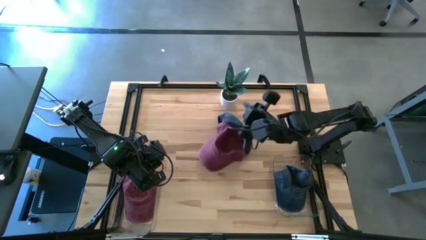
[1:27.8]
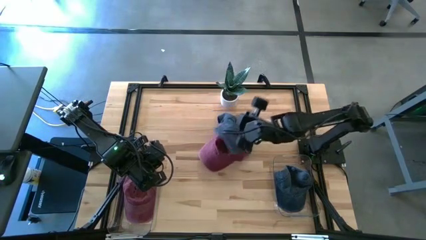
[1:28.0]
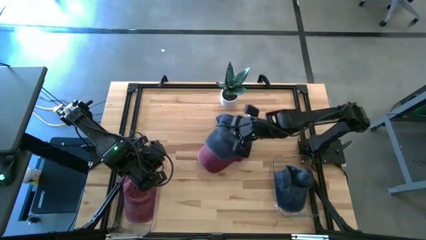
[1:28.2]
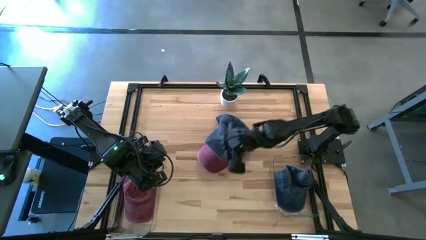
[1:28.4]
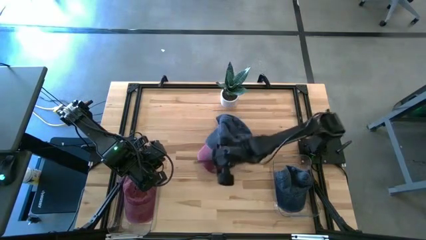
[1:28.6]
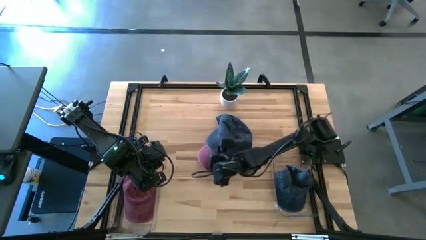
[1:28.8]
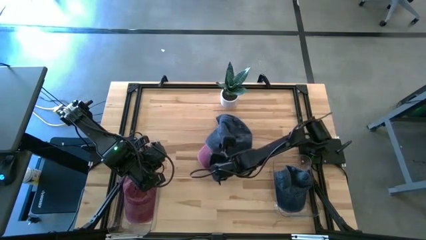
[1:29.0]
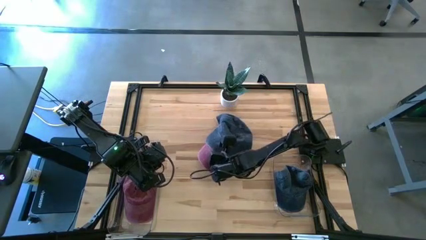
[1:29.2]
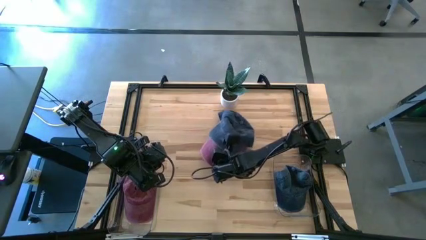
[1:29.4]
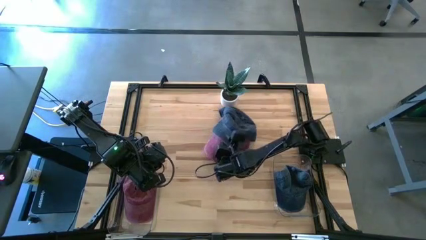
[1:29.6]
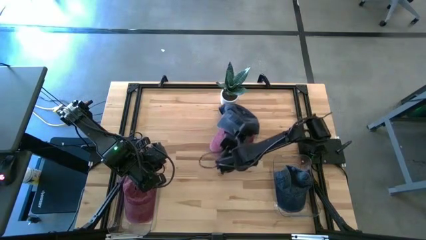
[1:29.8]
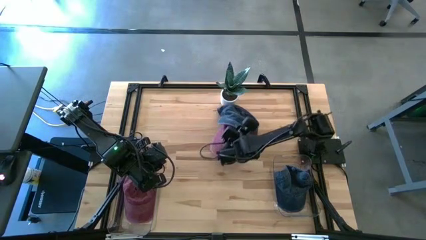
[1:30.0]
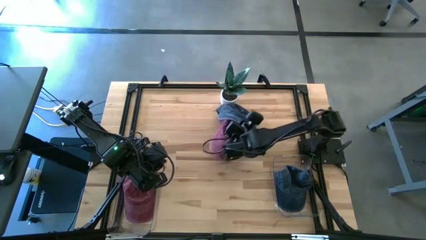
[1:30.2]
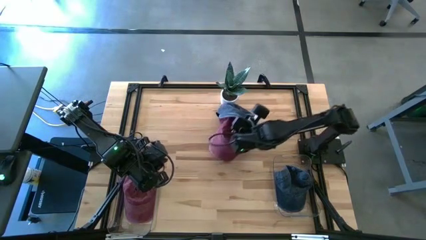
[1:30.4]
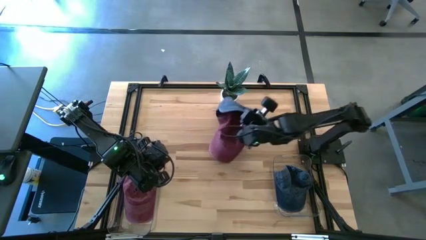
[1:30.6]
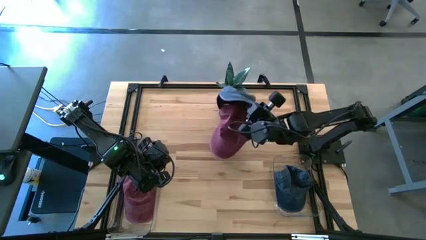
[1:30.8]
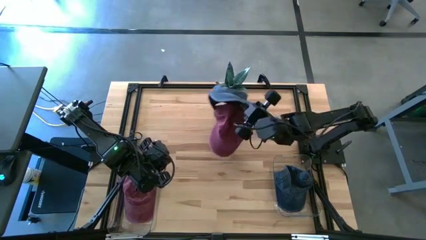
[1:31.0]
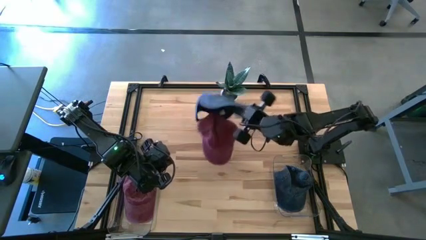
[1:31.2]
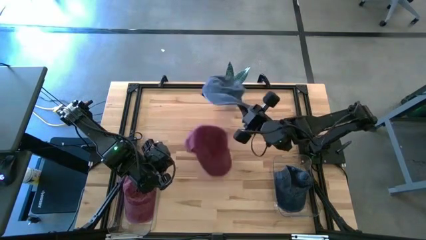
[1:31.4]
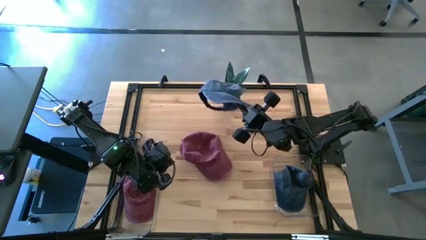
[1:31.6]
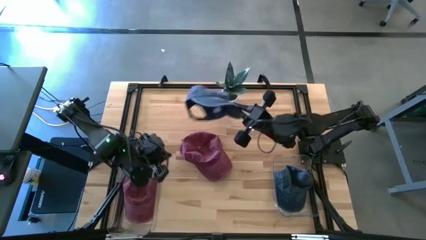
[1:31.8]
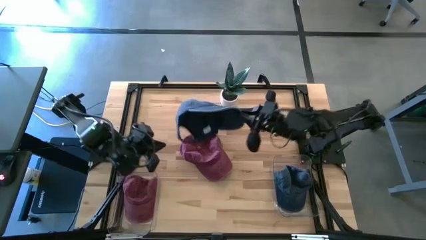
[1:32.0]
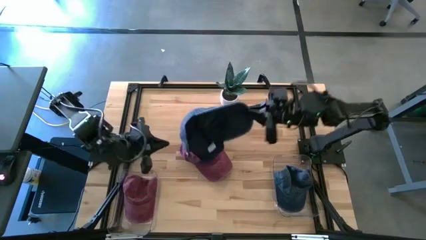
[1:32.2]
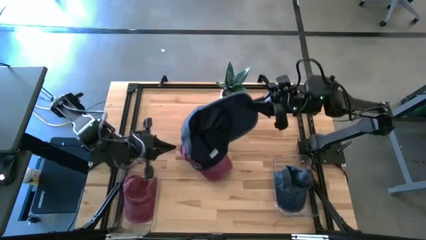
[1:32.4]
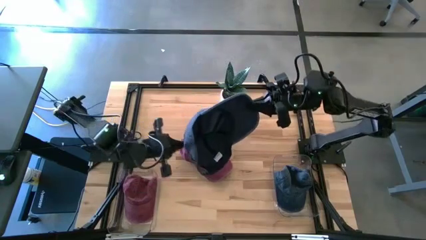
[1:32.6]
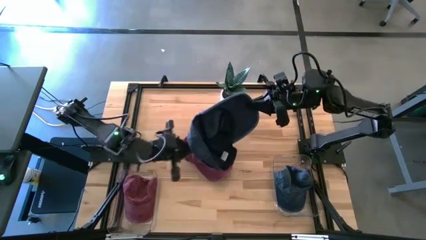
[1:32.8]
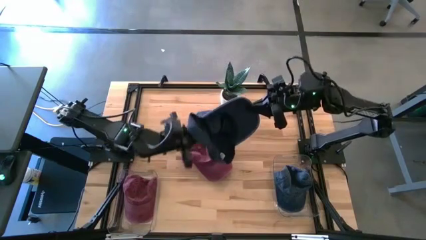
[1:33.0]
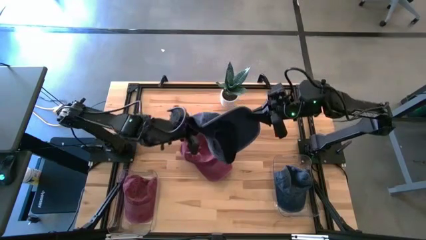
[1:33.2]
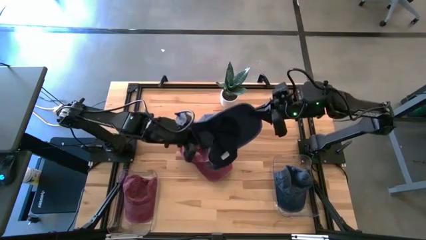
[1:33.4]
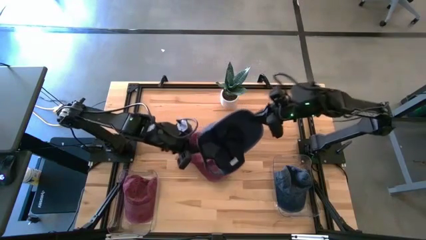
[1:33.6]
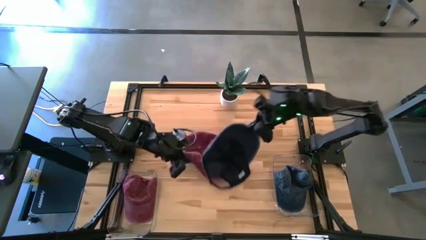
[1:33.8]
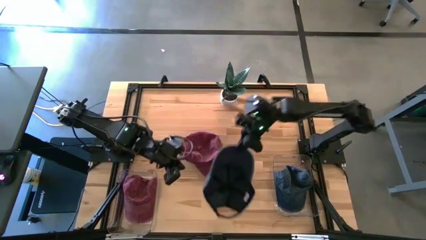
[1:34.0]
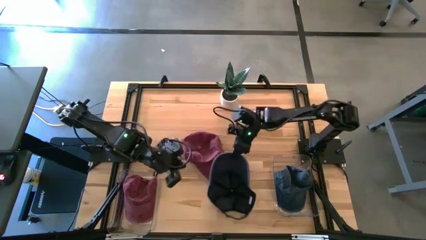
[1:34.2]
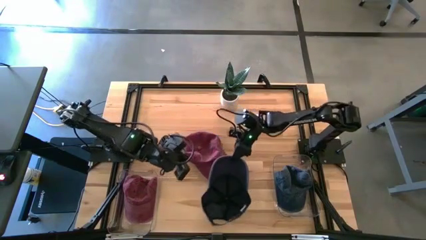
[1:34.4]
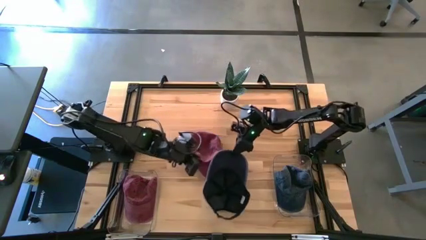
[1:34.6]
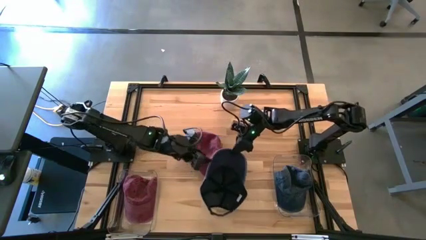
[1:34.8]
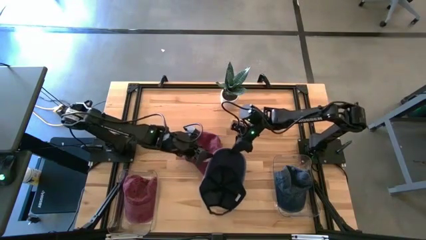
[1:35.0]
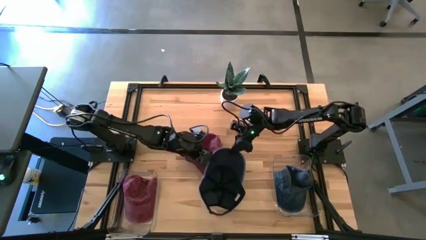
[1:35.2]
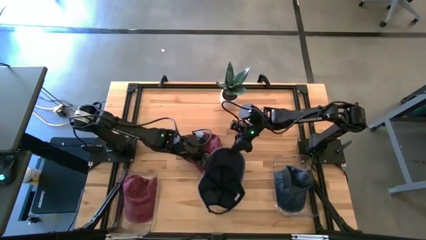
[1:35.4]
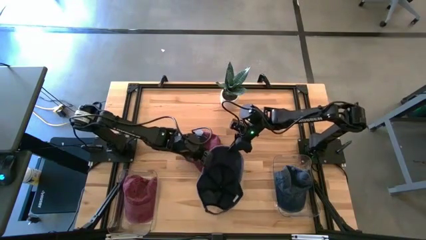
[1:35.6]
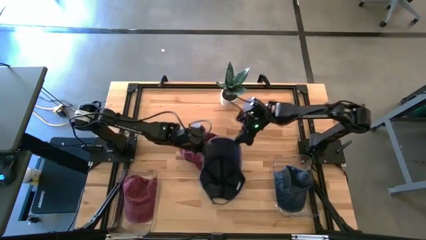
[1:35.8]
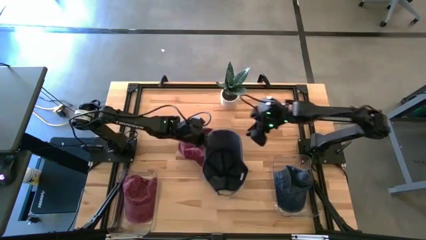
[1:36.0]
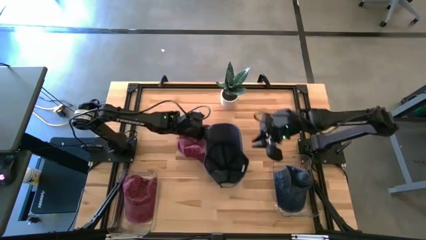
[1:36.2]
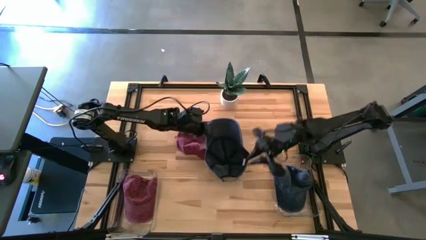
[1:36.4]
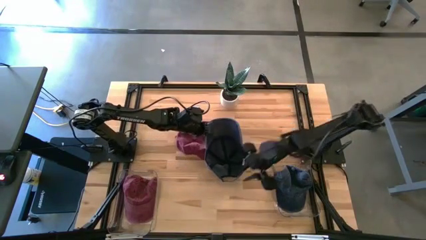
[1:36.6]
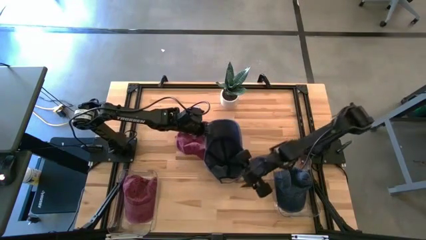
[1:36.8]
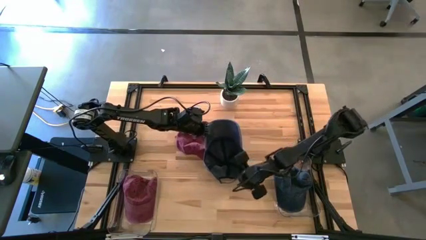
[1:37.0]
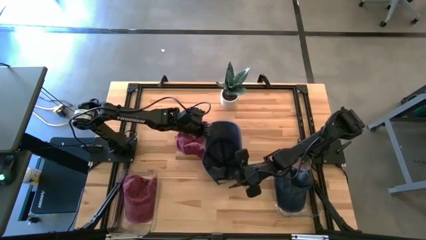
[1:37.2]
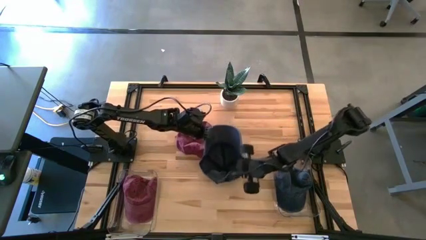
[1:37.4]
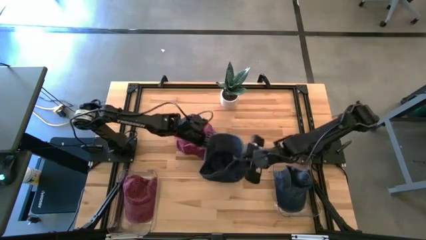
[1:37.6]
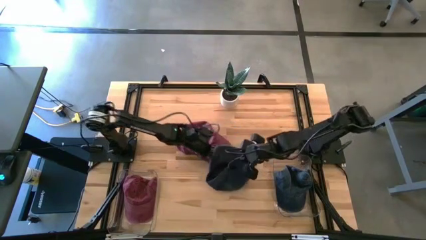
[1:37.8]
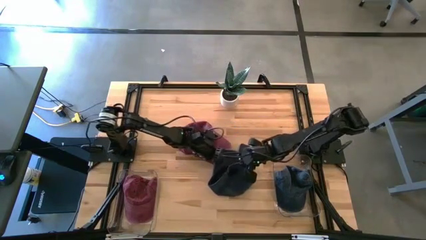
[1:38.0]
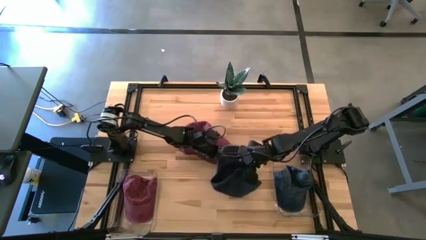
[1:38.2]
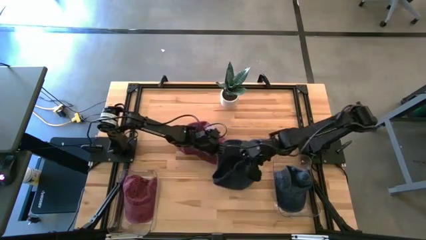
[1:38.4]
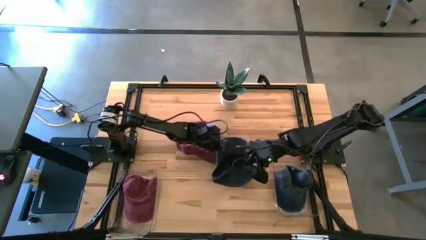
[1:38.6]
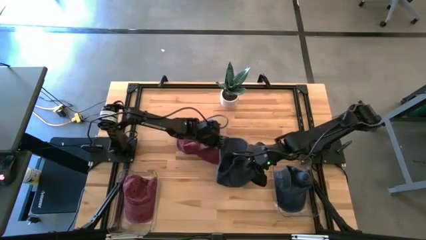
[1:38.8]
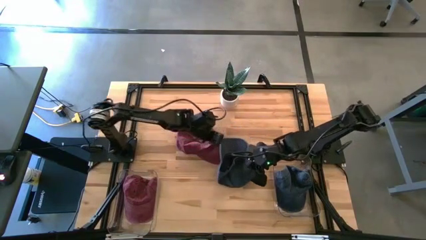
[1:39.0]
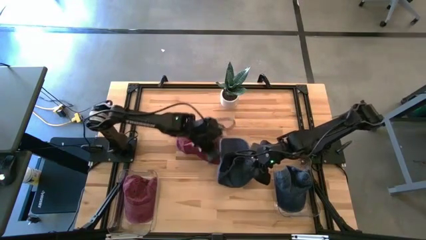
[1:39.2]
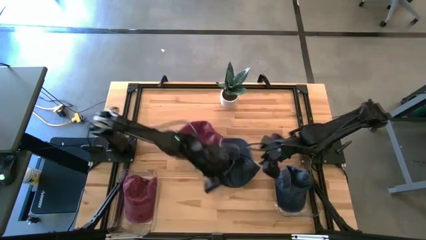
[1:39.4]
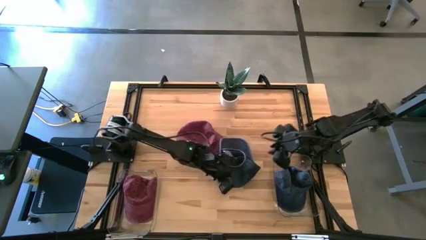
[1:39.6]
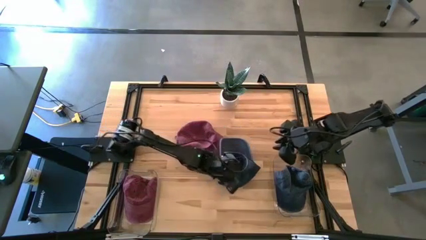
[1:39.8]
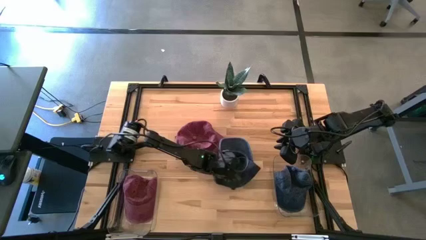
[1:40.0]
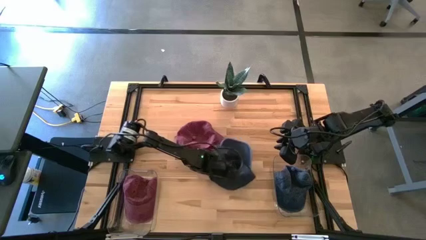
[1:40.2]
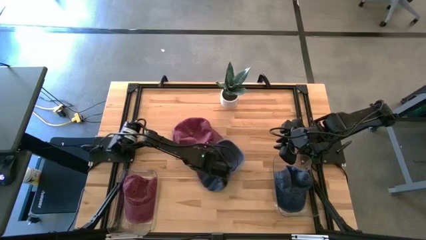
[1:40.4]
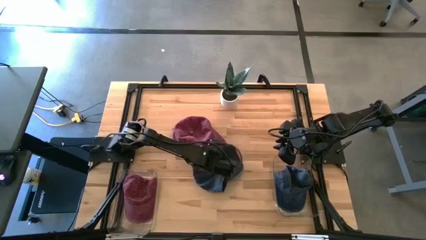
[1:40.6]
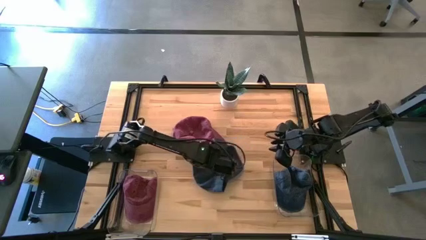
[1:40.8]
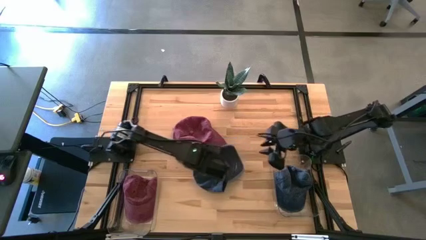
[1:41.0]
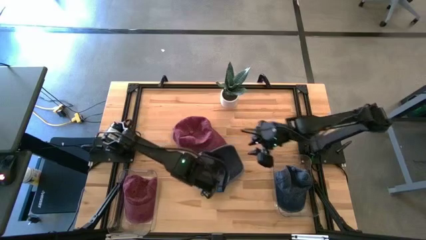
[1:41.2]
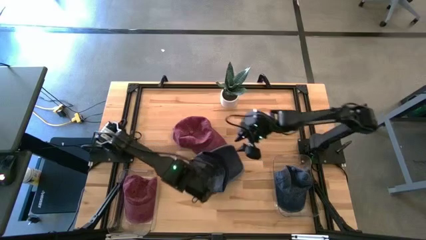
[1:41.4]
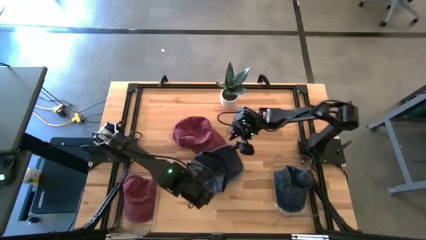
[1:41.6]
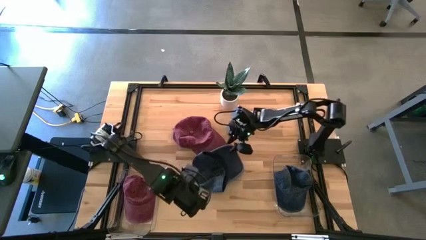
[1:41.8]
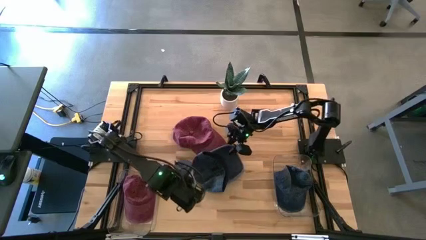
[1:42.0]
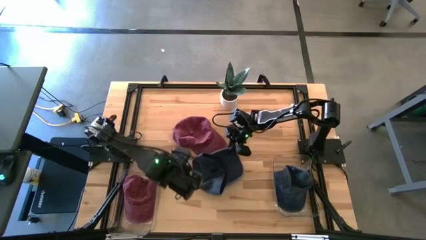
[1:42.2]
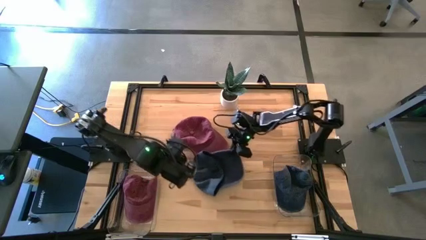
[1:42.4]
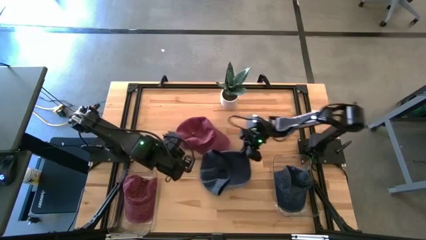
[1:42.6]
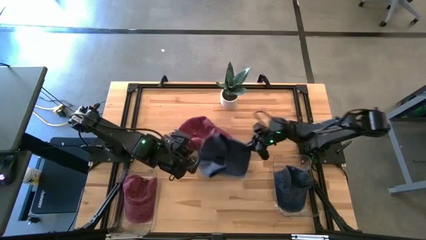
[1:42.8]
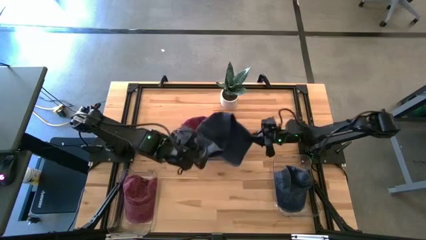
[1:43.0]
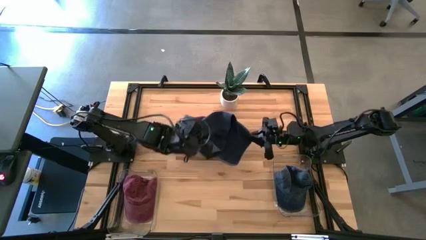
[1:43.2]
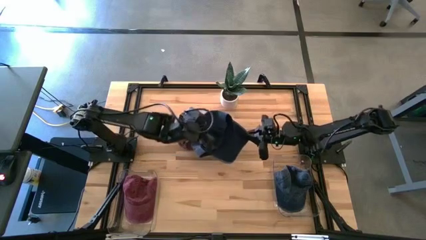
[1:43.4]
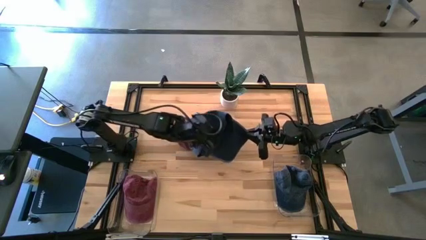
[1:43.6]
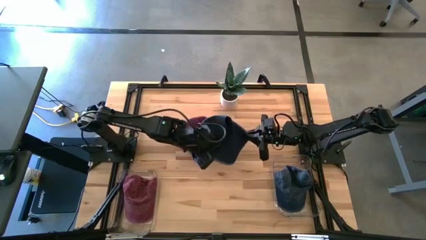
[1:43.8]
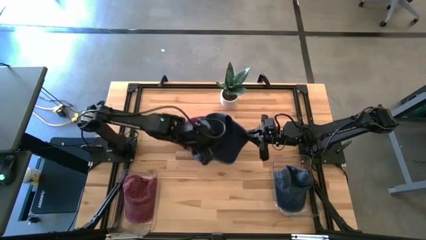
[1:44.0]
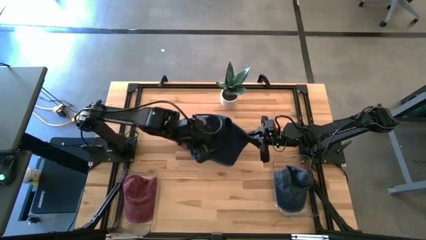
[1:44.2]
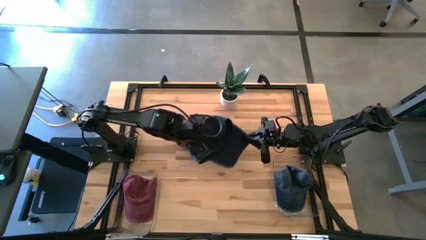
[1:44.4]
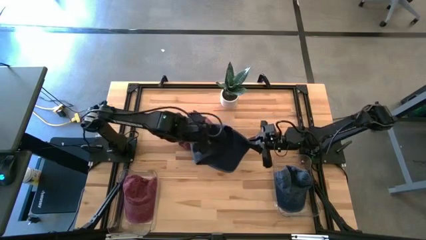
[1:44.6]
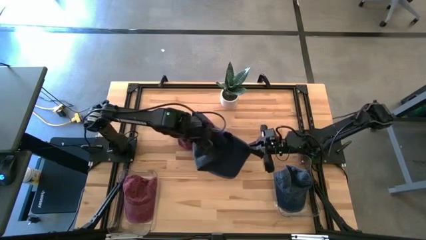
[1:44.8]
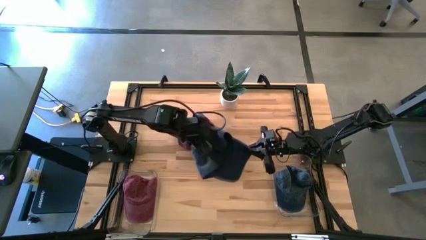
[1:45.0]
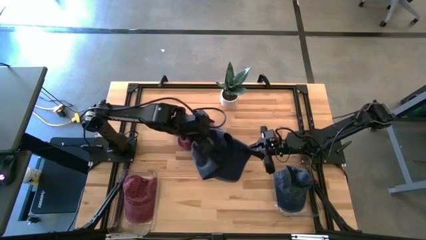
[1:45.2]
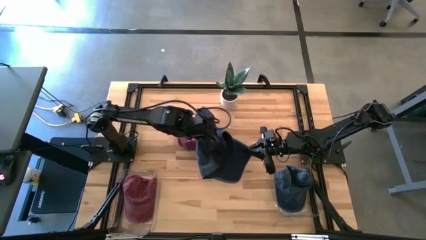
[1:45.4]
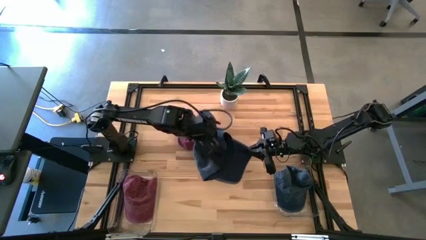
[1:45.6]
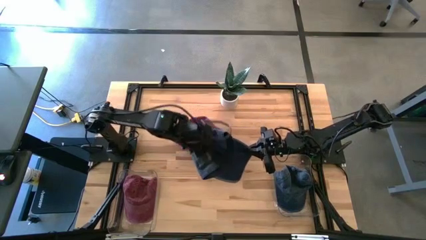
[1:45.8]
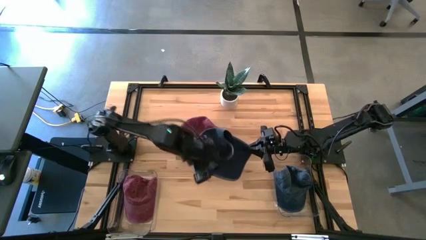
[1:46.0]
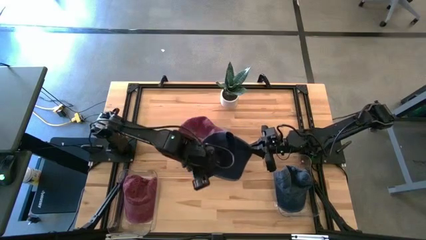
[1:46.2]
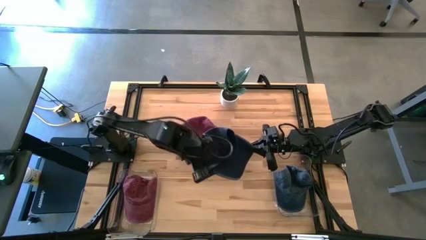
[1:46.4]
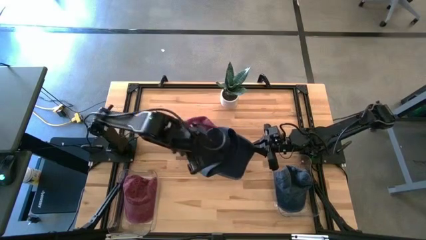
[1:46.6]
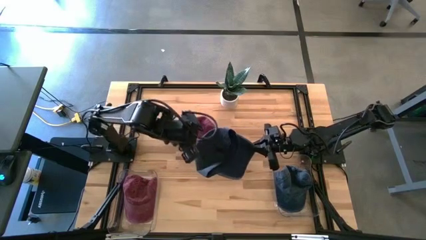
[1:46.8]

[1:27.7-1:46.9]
Task: Pick & Place hat
Put the blue cap into the right transparent bin
